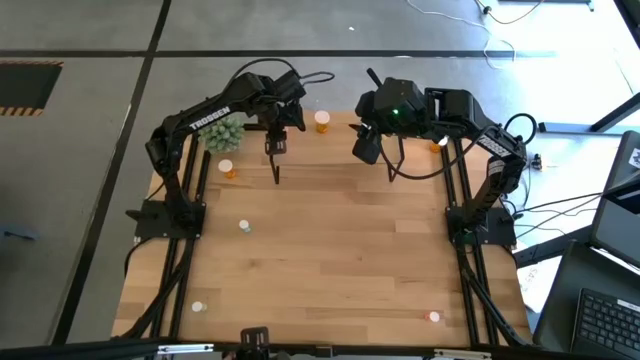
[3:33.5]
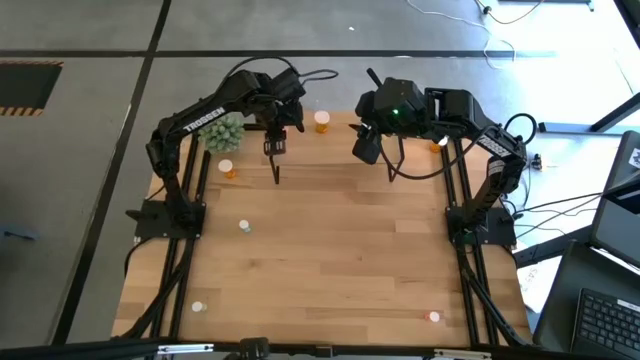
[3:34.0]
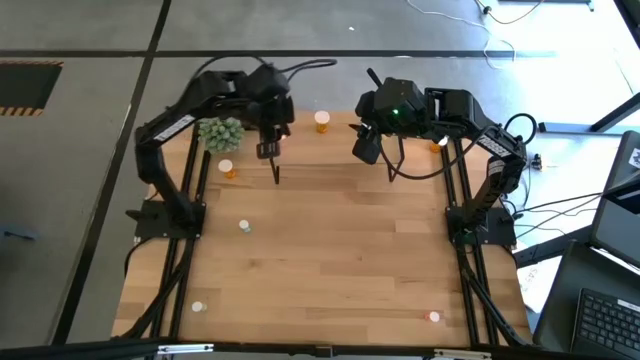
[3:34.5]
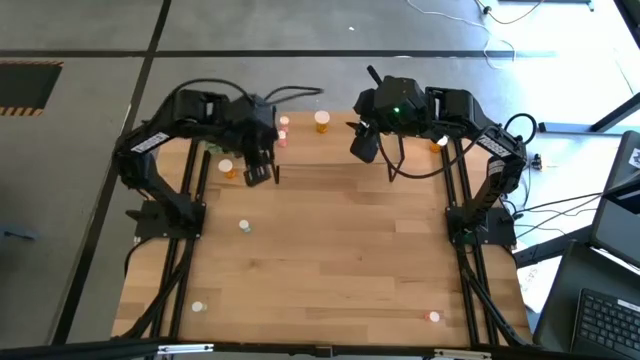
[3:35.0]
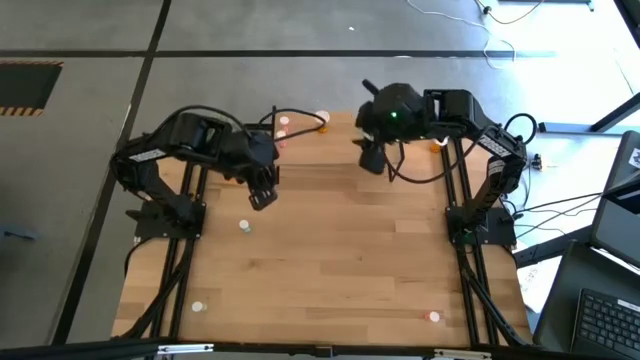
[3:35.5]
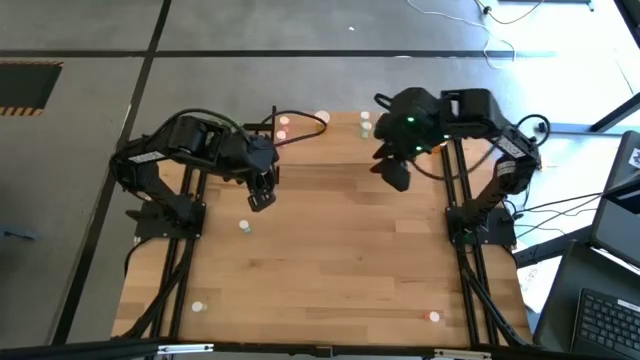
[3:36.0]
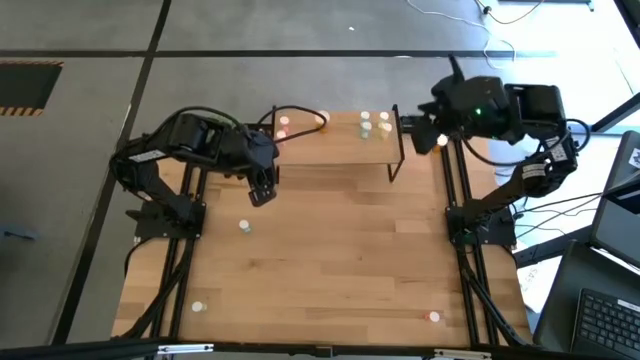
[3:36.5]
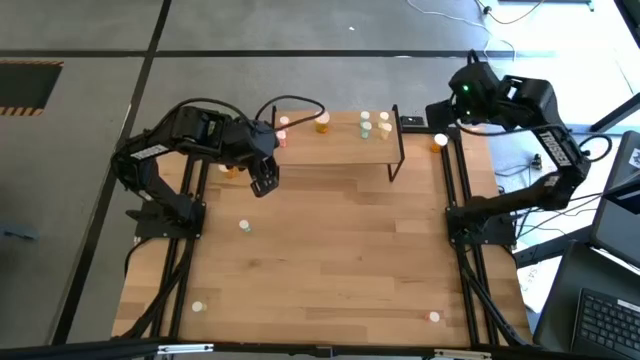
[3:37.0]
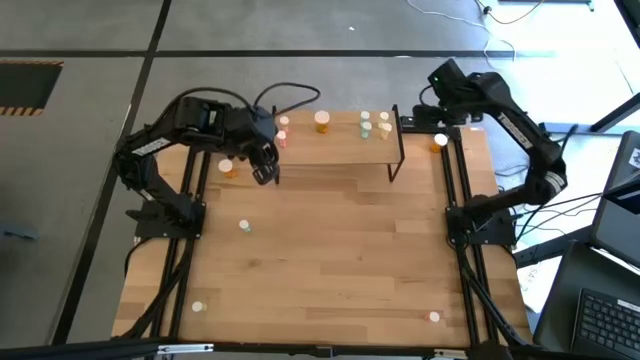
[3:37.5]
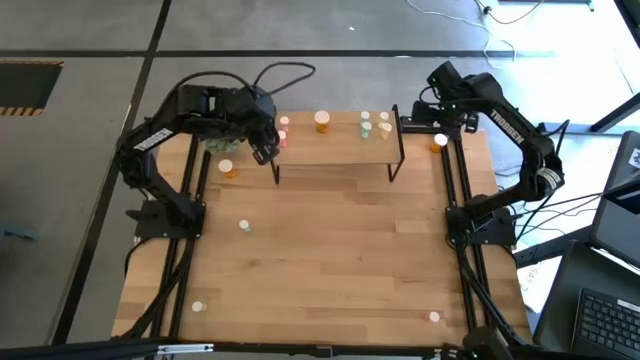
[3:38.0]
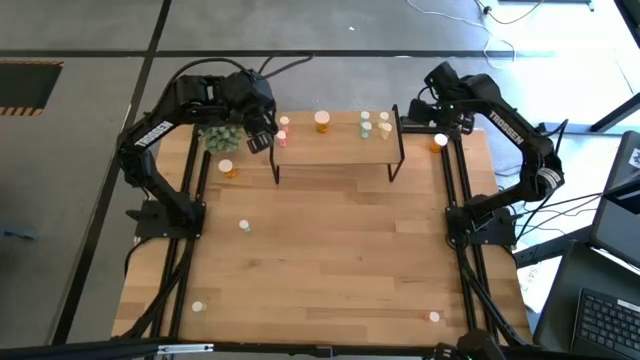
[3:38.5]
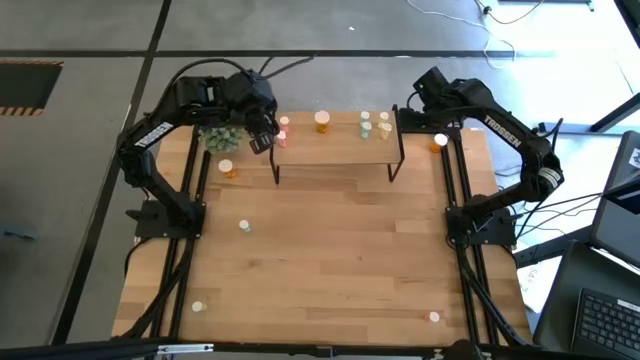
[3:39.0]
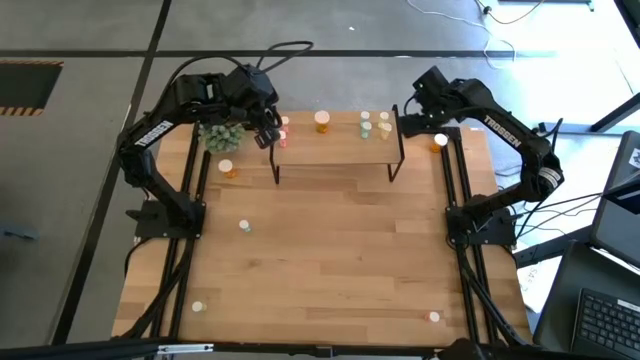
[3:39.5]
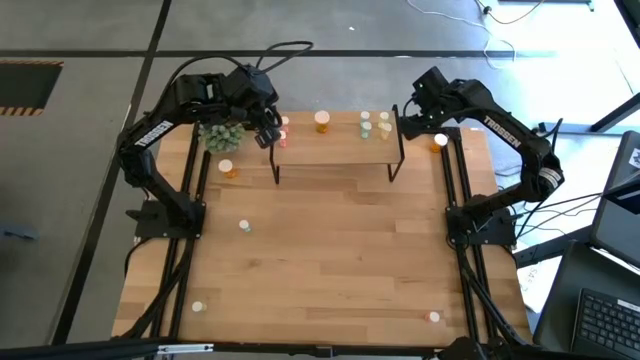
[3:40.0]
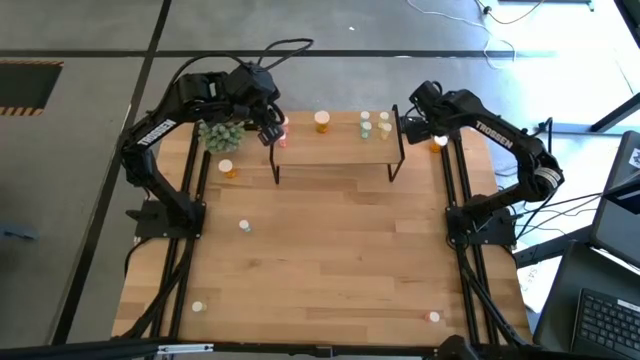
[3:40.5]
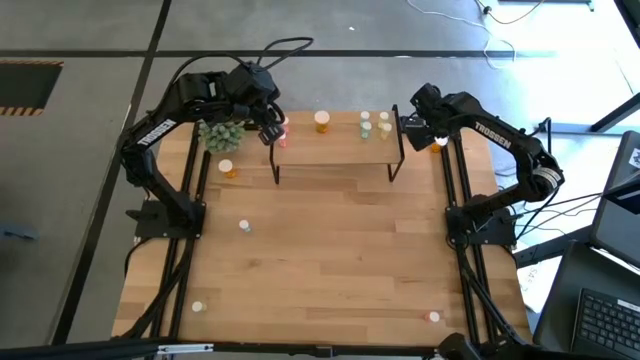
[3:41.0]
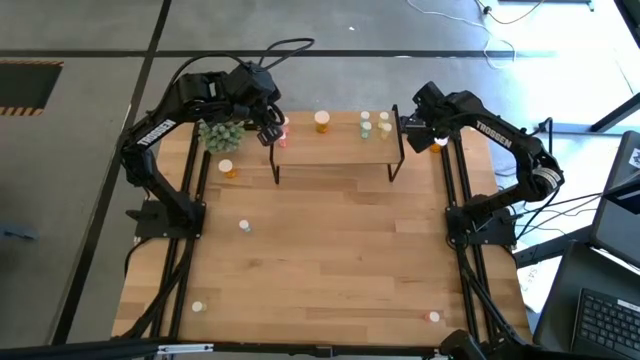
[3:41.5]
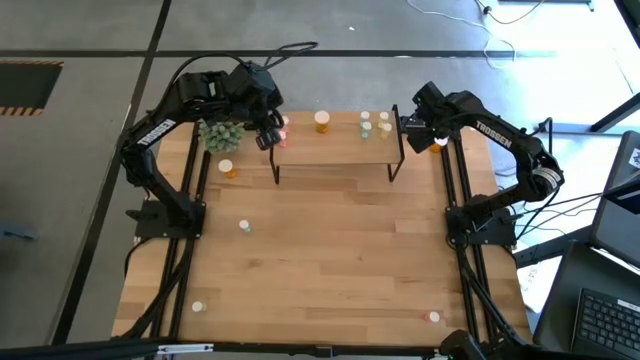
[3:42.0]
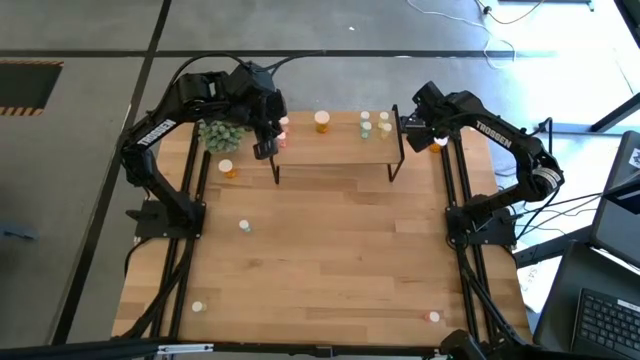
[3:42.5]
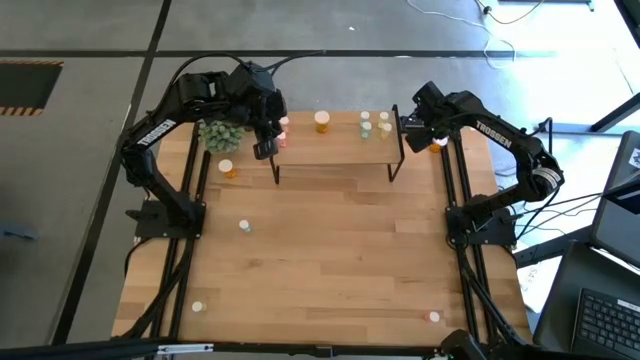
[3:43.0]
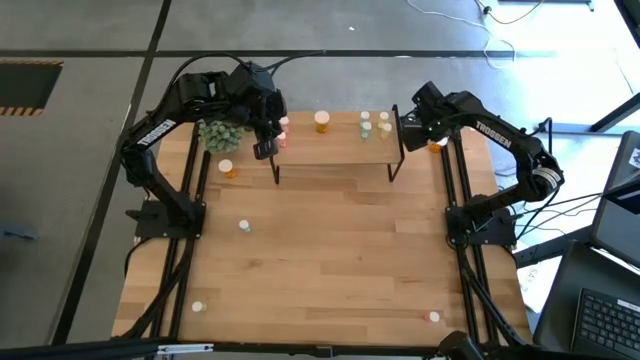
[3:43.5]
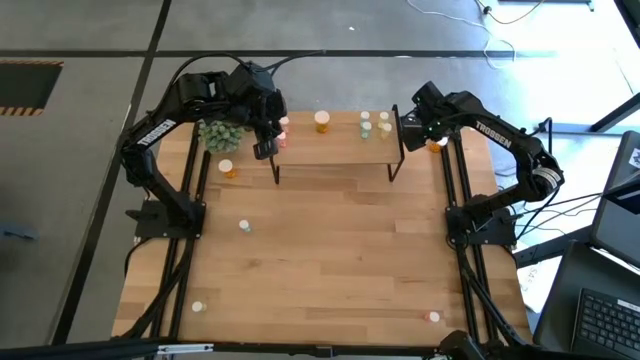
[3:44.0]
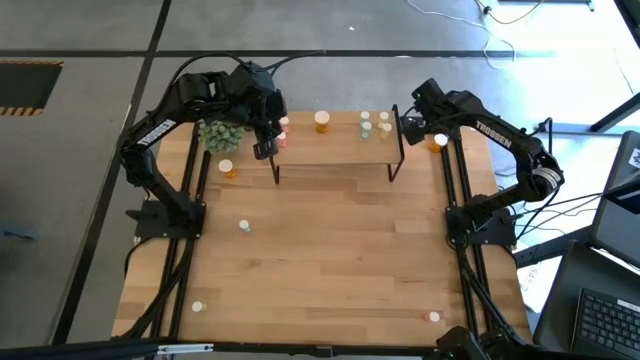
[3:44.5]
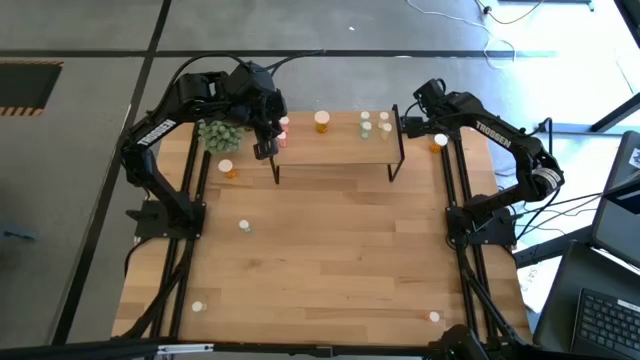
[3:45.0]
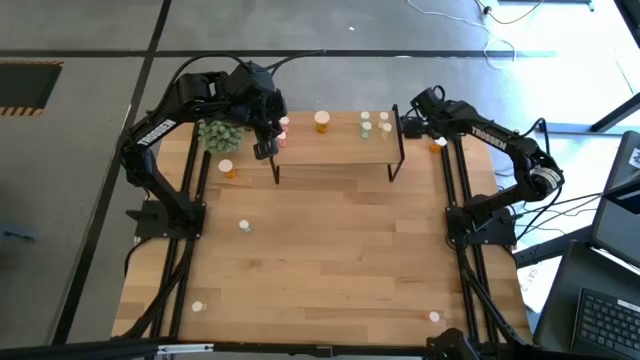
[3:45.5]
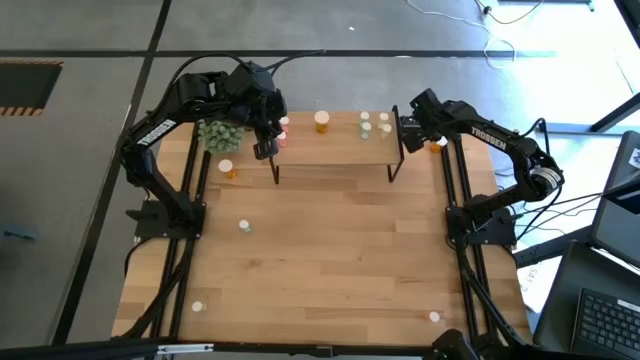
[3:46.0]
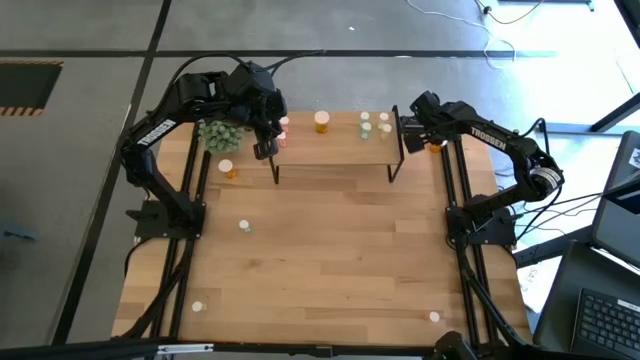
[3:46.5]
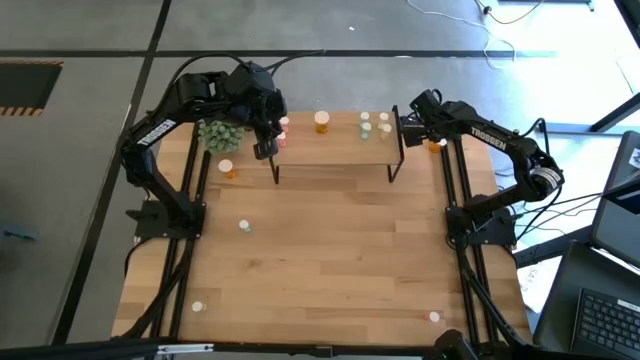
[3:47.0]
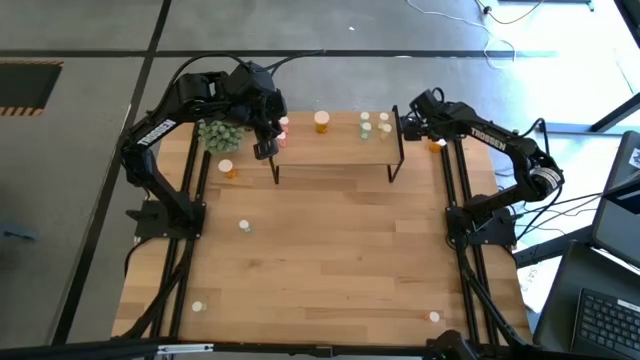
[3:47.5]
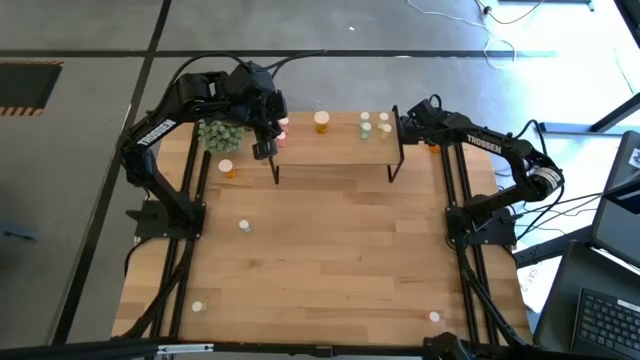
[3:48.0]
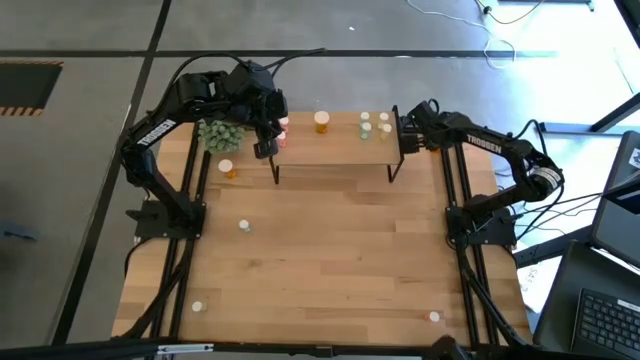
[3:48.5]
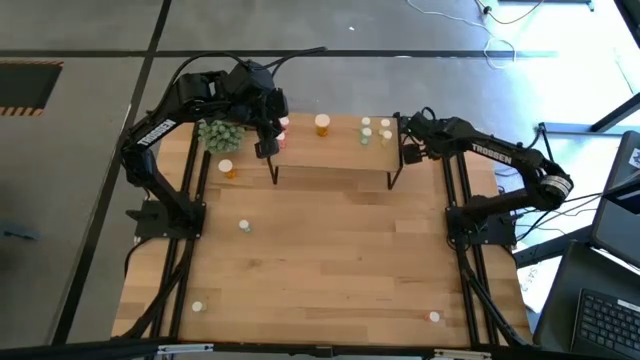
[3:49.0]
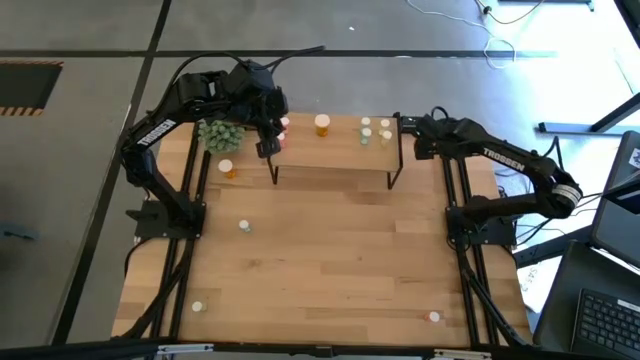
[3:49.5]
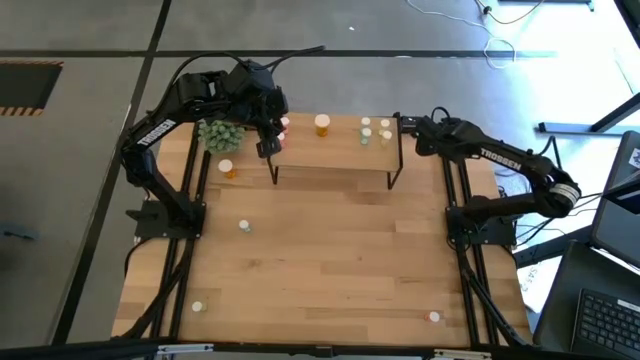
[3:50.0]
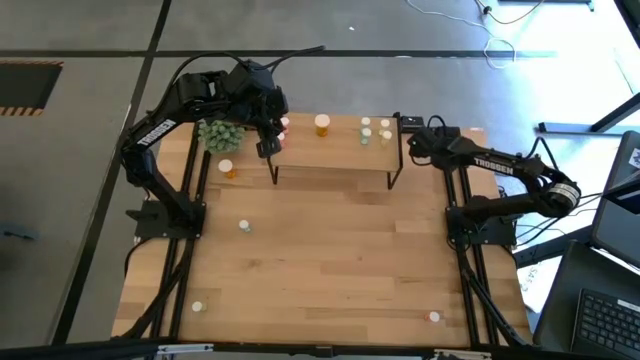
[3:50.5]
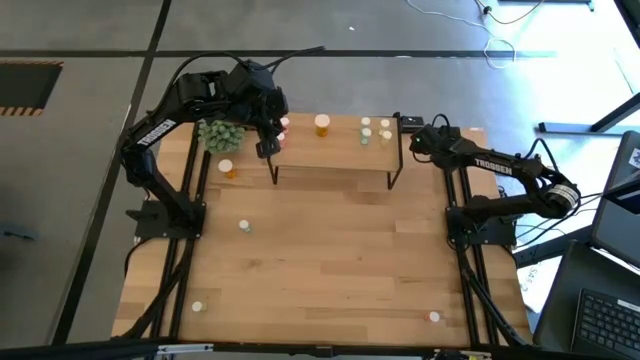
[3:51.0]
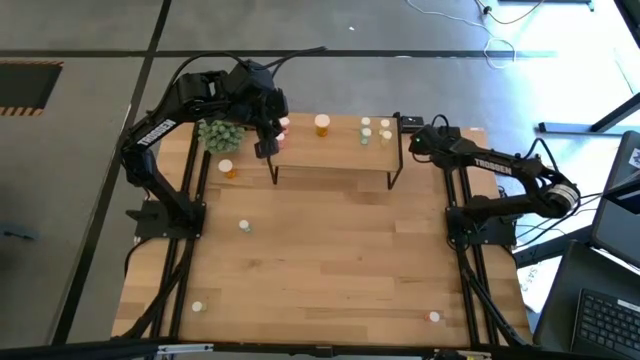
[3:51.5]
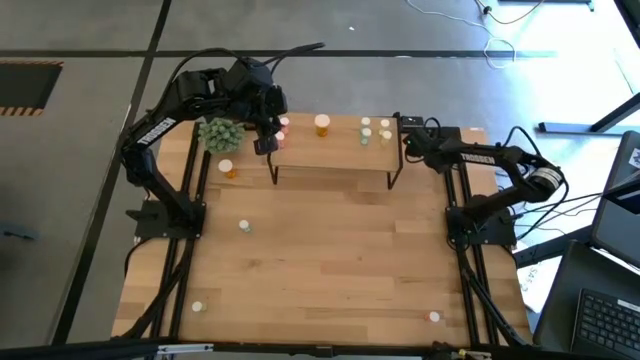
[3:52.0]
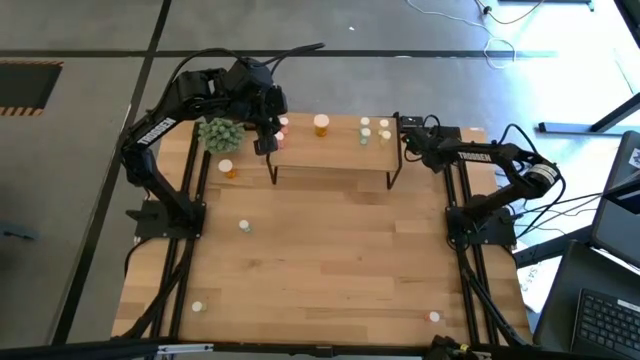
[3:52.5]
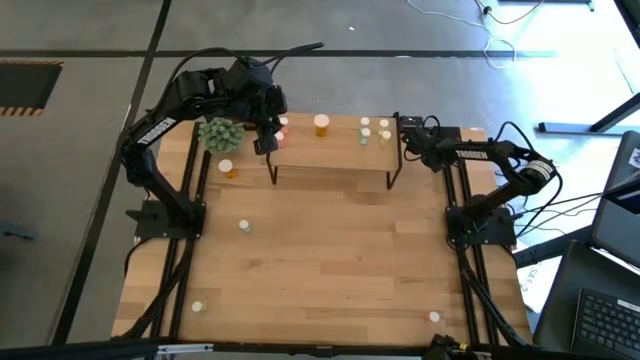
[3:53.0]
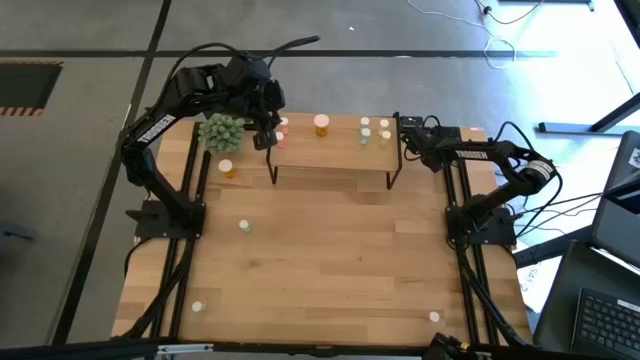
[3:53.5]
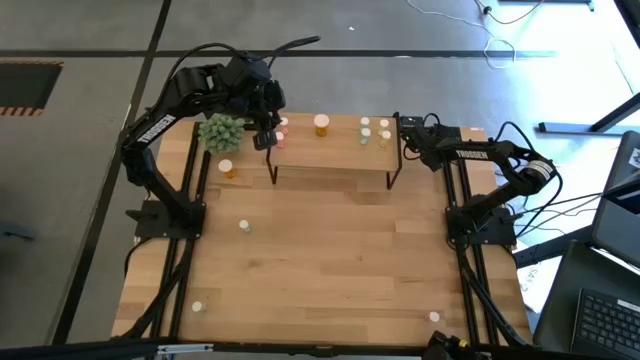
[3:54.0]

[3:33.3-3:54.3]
Task: Pick and place medicine bottles onto shelf by color
Put the right orange medicine bottle on the shelf, aligned with the other orange medicine bottle
